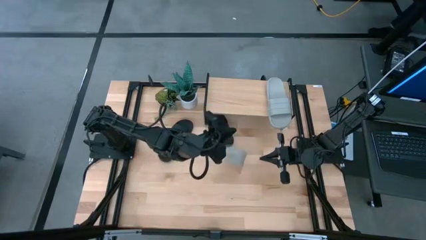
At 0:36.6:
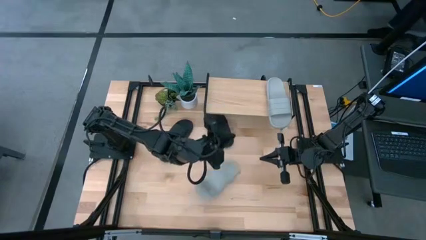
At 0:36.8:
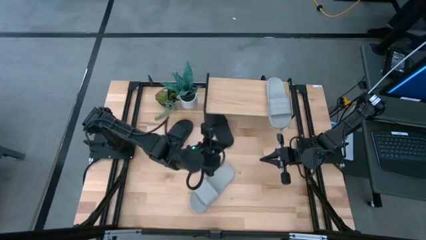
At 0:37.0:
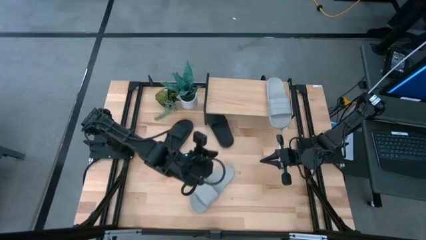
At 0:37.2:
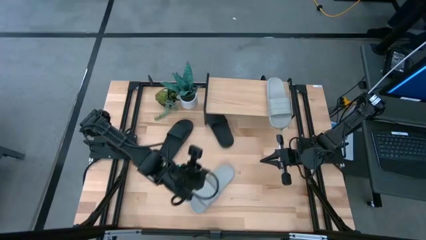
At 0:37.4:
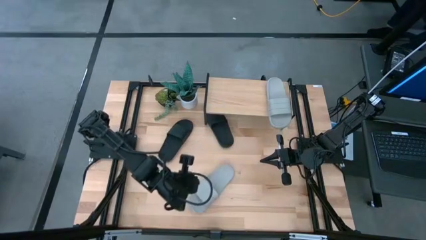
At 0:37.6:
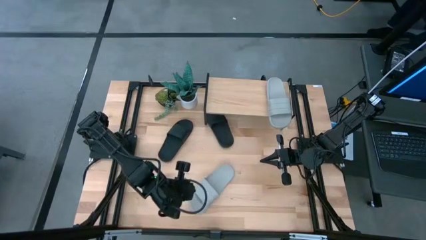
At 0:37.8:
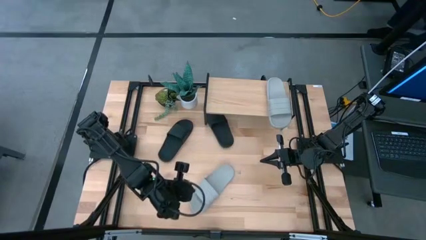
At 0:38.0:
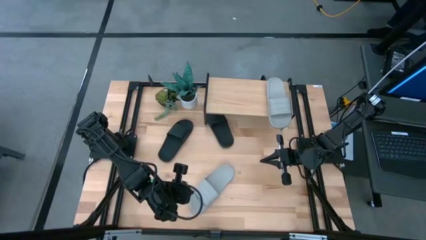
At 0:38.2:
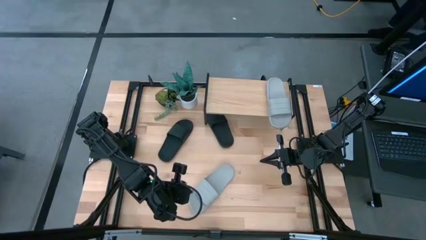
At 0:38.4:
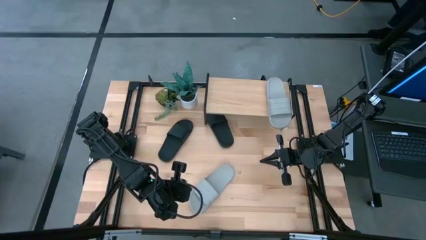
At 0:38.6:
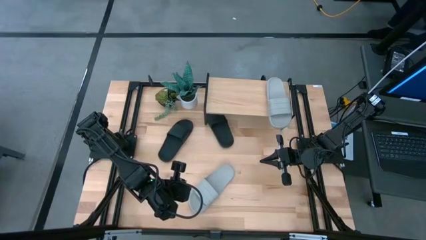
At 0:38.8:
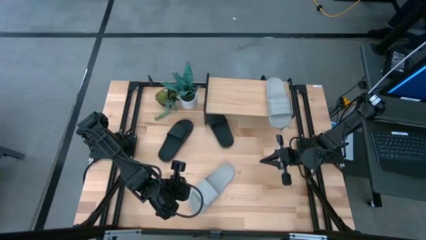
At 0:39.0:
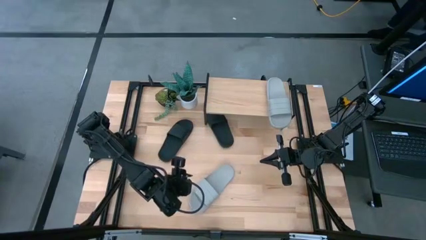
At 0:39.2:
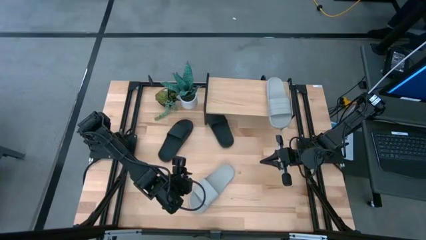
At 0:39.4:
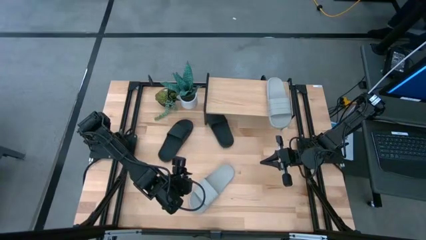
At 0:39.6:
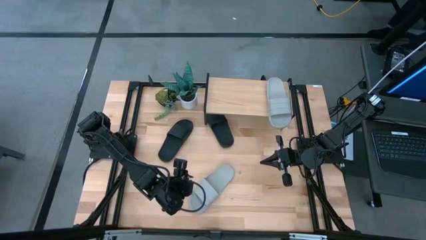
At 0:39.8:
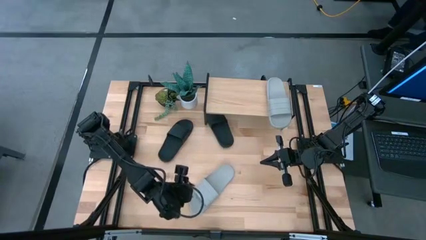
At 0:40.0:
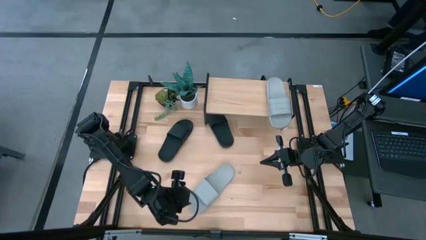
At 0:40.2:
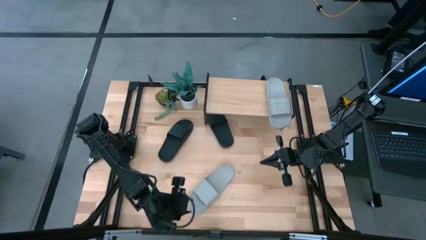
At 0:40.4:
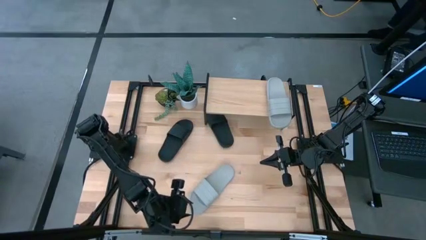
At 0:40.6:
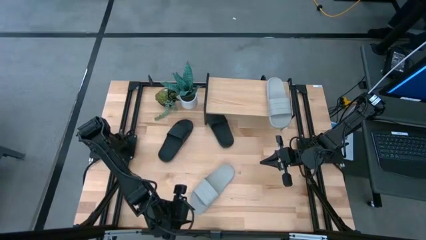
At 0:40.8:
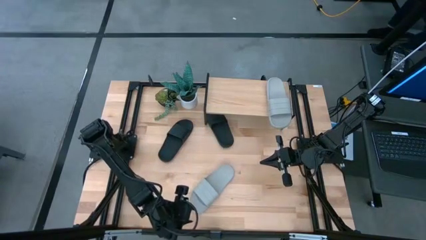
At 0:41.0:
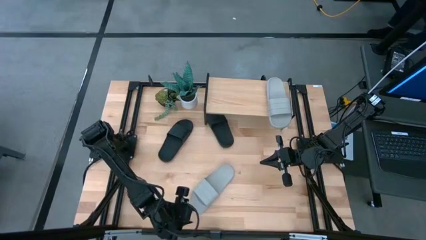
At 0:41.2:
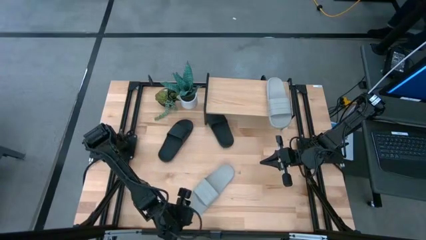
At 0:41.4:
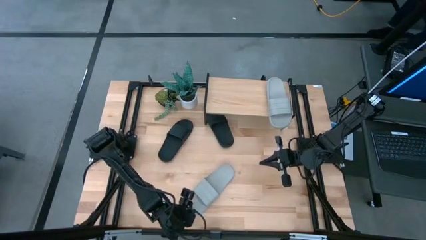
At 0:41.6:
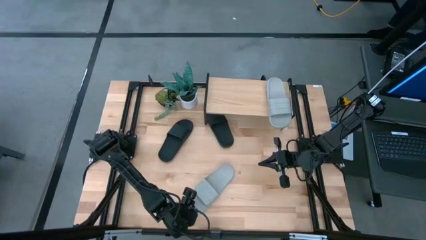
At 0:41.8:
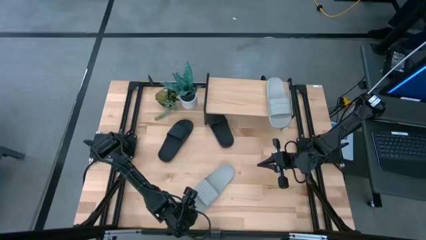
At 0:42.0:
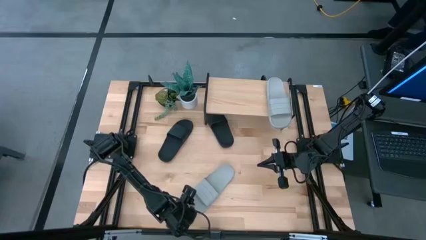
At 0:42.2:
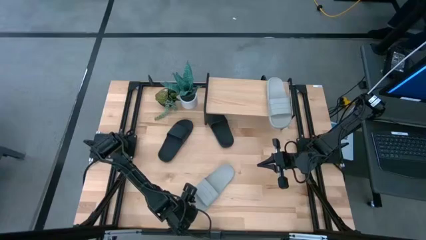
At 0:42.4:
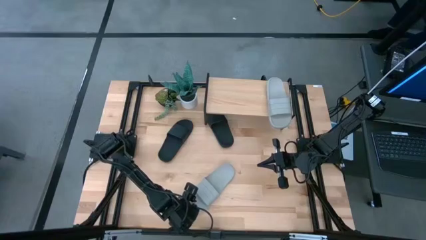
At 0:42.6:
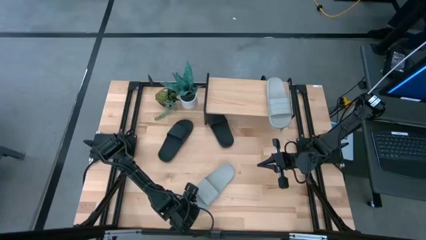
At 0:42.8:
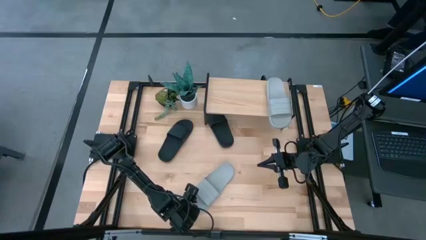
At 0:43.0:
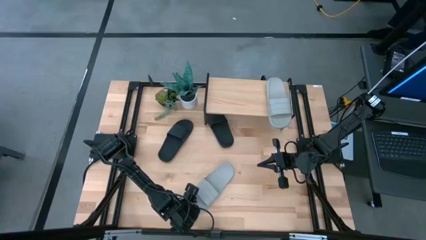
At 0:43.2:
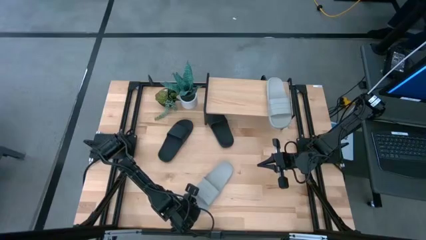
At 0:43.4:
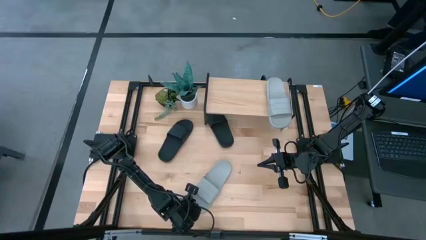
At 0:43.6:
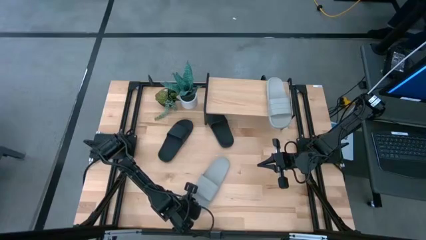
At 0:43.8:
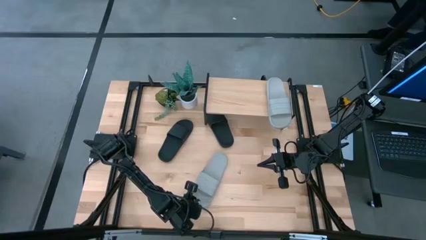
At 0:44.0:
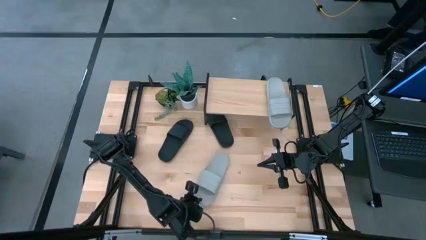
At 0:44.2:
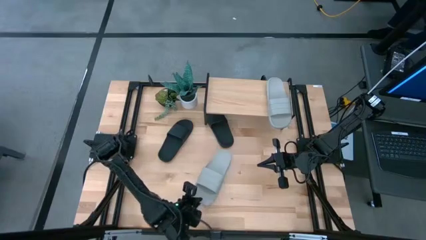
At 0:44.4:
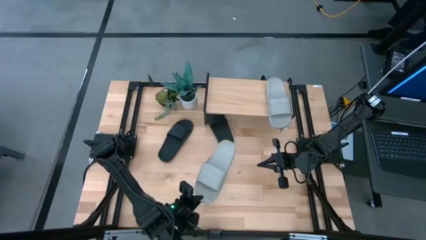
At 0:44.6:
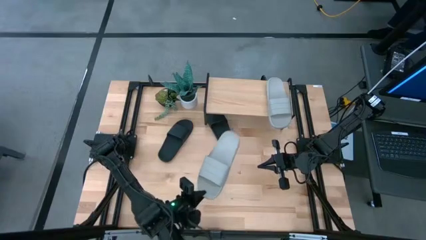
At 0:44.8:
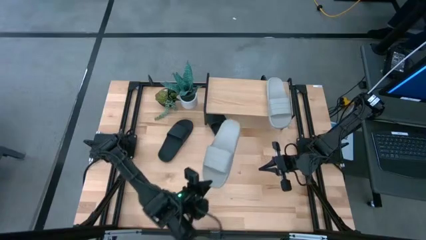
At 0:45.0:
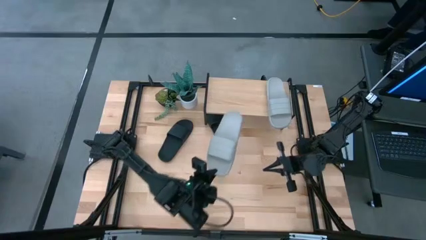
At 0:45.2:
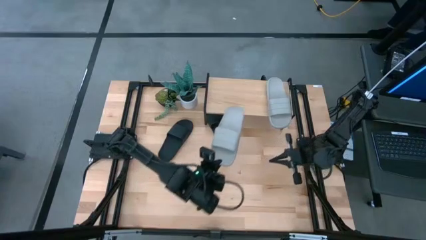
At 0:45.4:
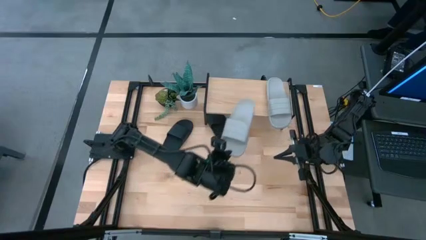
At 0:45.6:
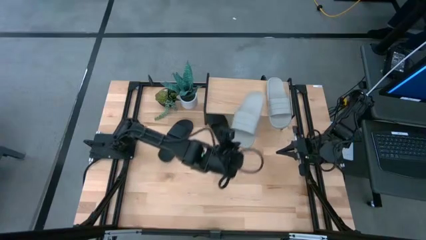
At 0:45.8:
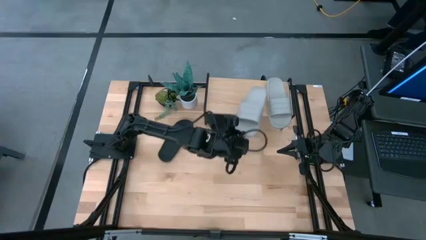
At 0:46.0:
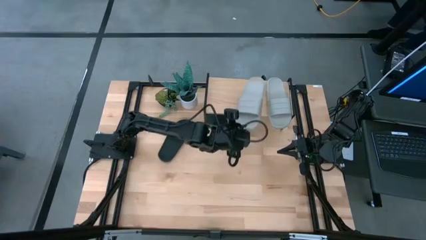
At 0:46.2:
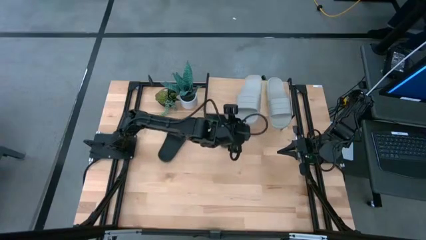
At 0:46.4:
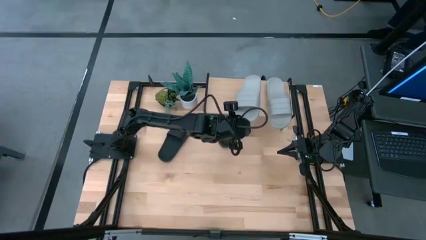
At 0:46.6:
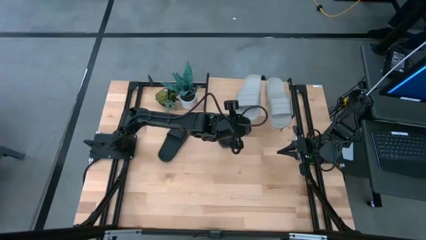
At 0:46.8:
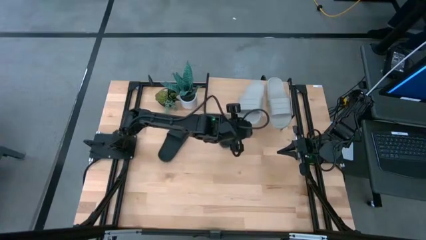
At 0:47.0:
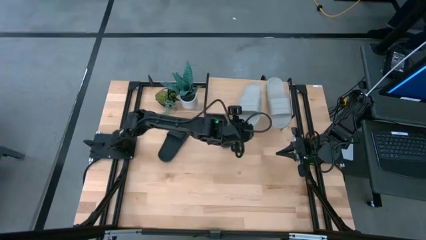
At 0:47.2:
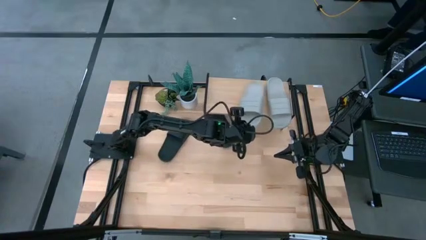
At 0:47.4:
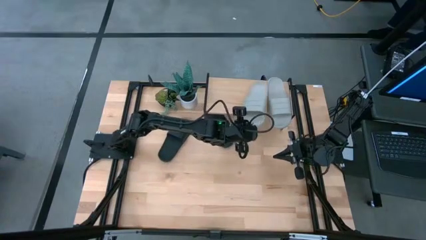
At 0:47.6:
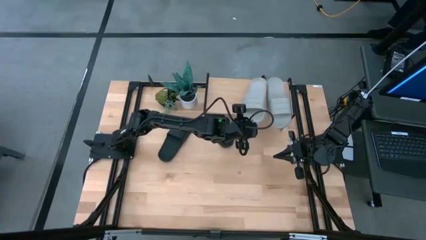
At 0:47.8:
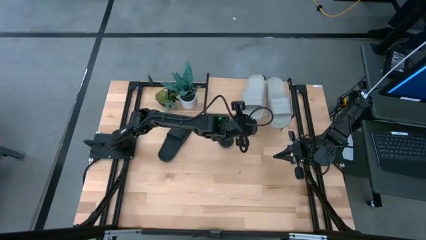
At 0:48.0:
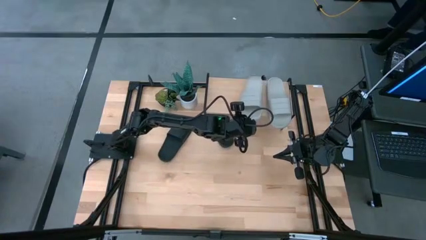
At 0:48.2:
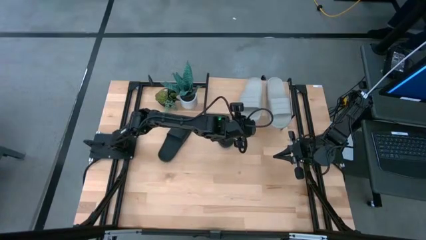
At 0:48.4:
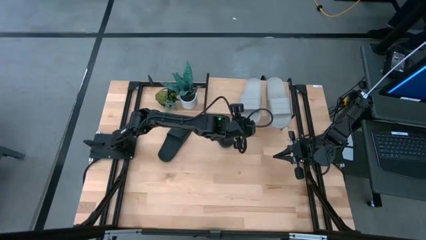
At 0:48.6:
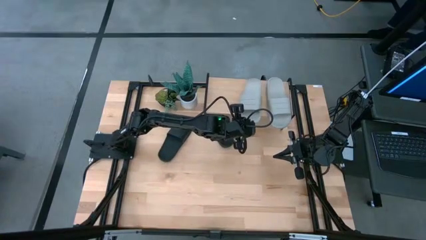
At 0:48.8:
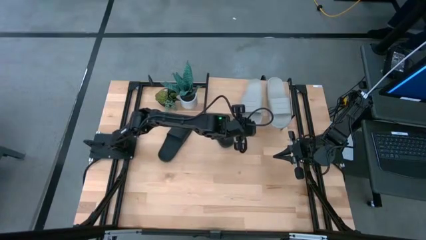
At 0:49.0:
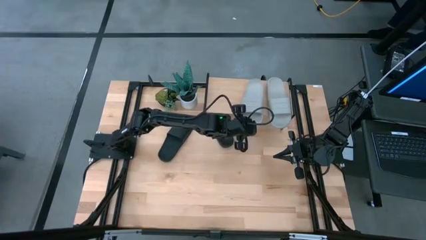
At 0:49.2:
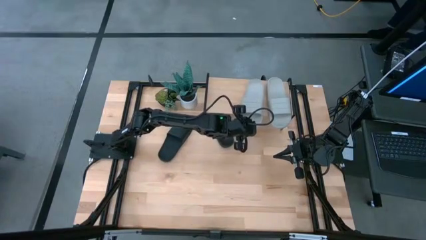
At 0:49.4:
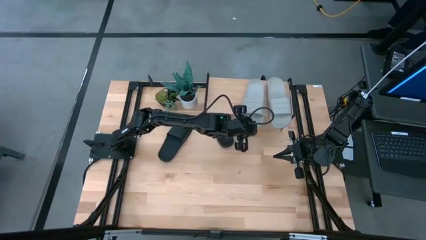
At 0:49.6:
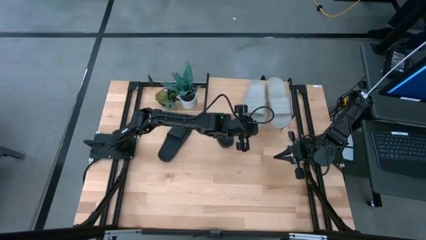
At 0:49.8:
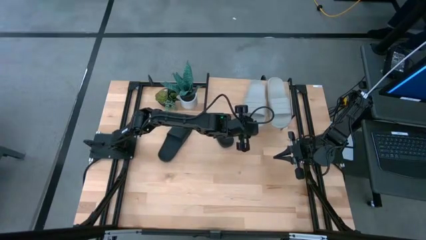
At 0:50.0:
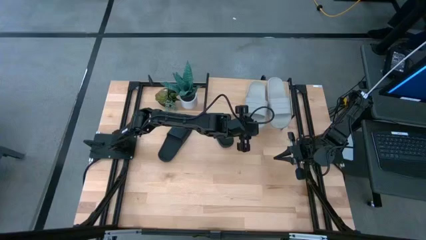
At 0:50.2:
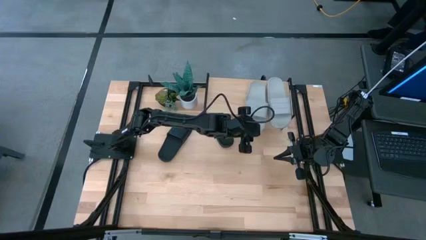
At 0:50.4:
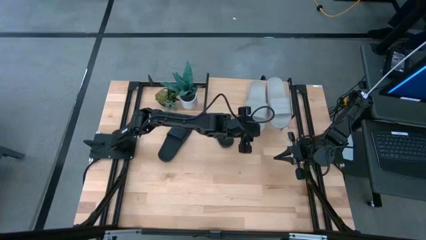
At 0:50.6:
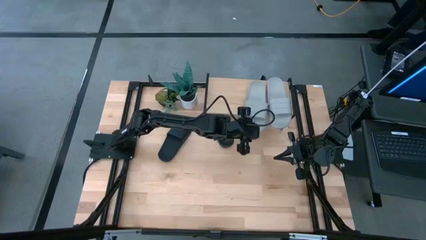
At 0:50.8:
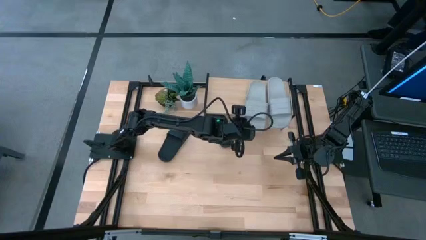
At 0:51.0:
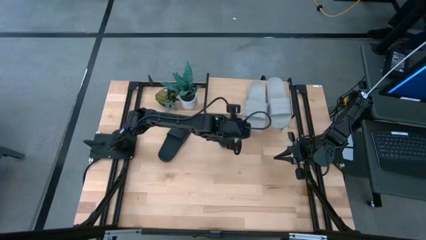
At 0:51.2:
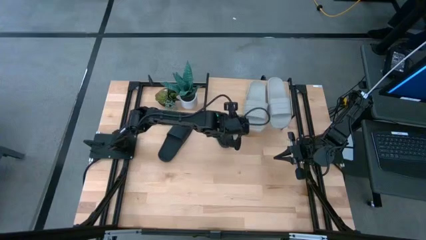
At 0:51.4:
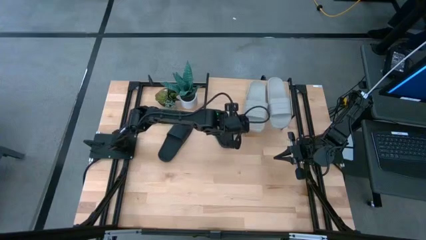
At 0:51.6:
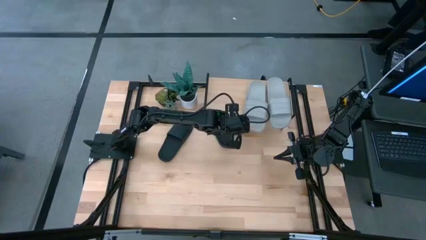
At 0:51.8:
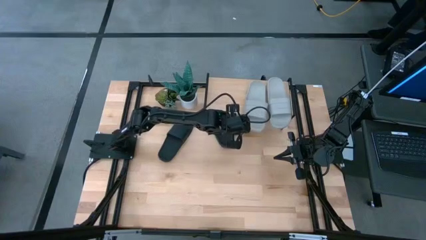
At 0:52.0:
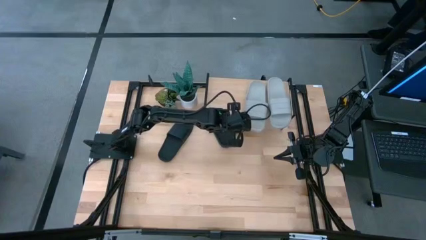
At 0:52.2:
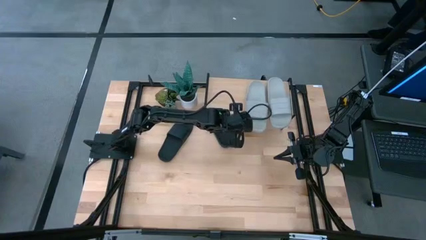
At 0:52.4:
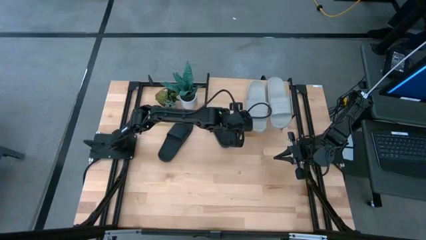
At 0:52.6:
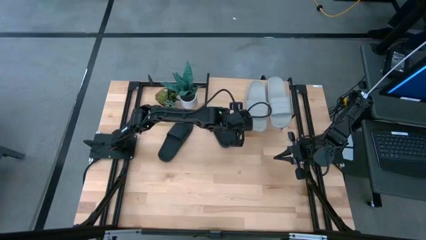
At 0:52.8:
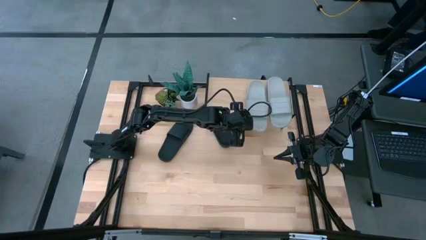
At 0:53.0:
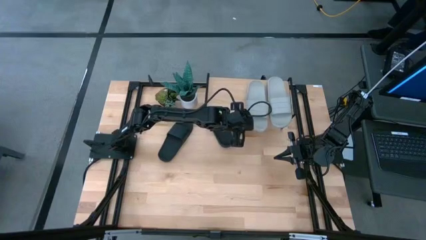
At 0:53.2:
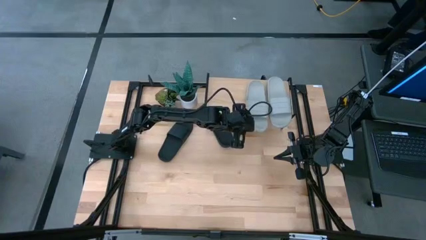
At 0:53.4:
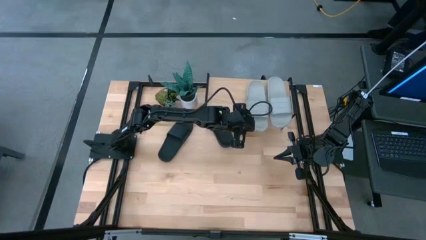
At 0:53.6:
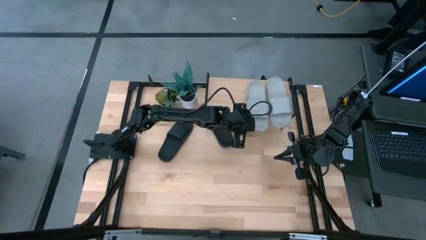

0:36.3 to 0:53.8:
Task: Pick and place slides into the shelf
Put the gray slipper on the shelf
